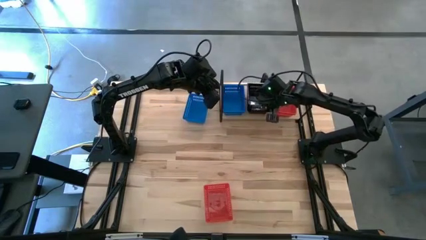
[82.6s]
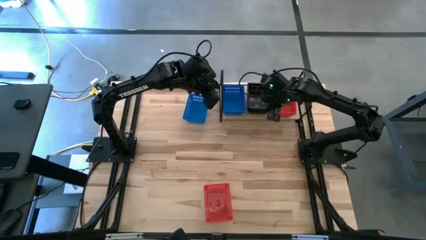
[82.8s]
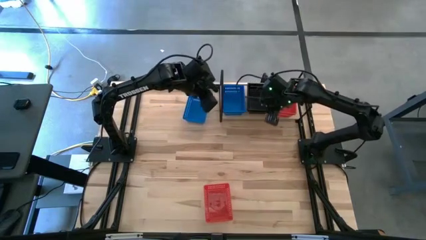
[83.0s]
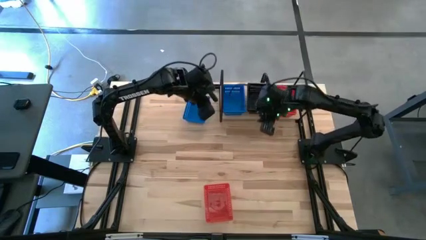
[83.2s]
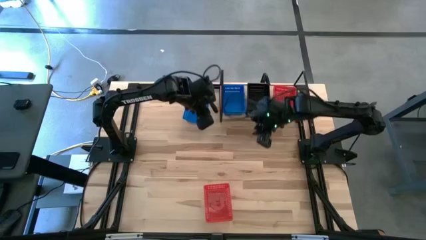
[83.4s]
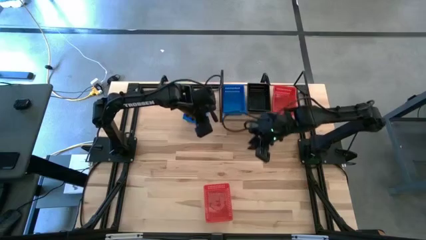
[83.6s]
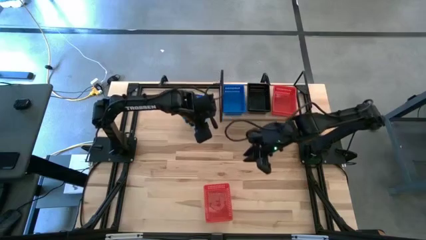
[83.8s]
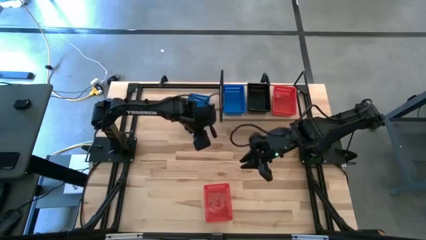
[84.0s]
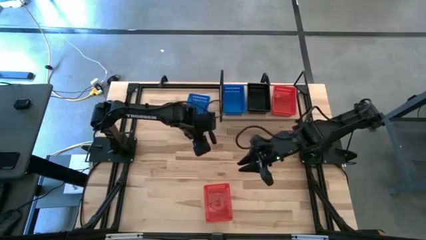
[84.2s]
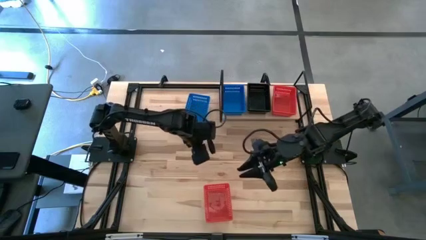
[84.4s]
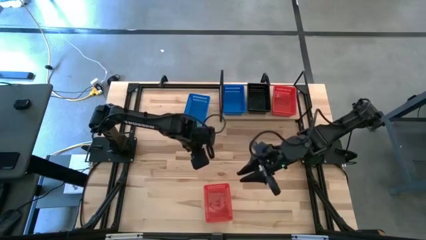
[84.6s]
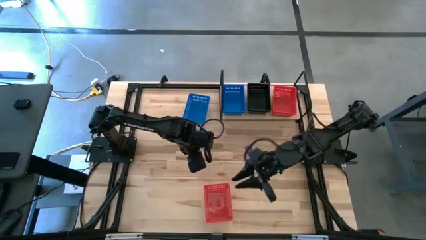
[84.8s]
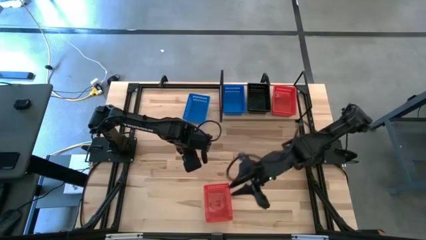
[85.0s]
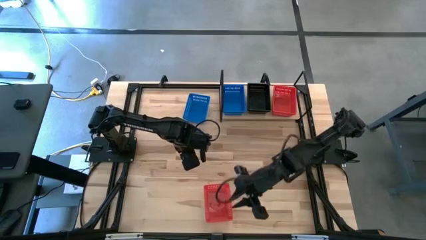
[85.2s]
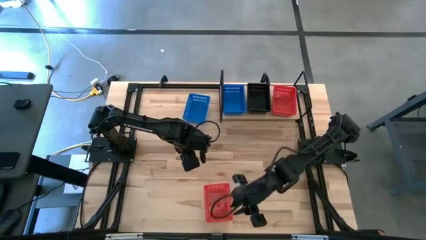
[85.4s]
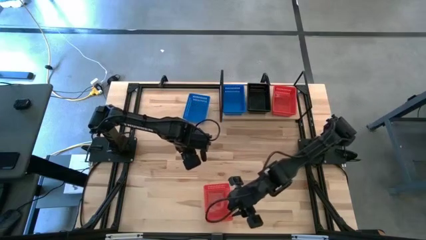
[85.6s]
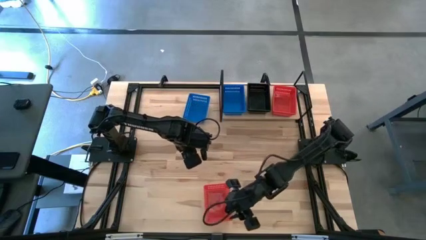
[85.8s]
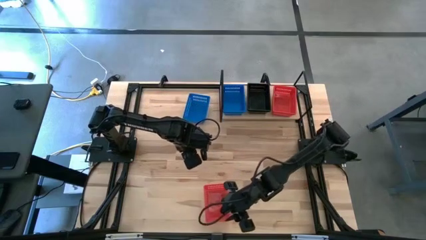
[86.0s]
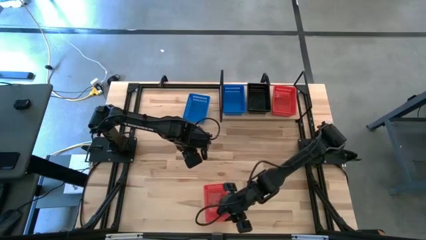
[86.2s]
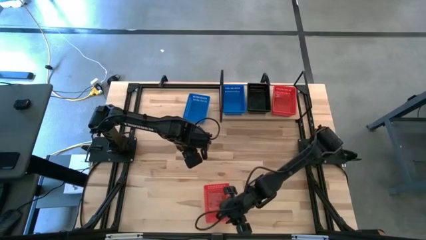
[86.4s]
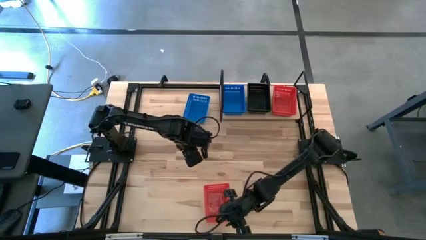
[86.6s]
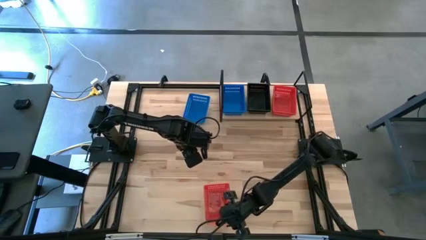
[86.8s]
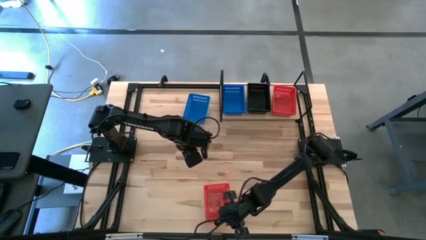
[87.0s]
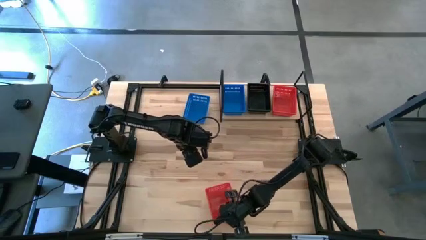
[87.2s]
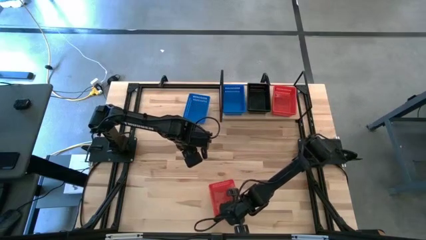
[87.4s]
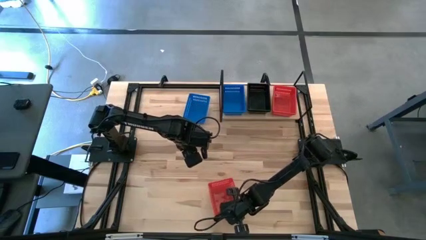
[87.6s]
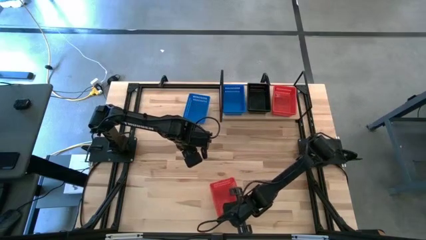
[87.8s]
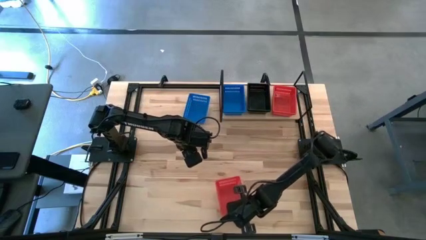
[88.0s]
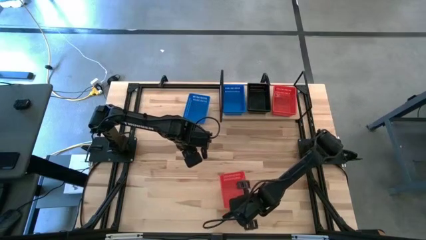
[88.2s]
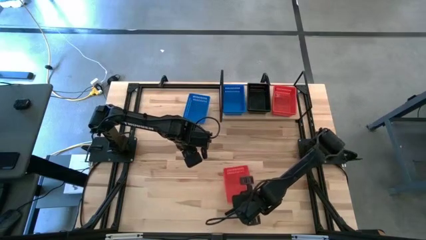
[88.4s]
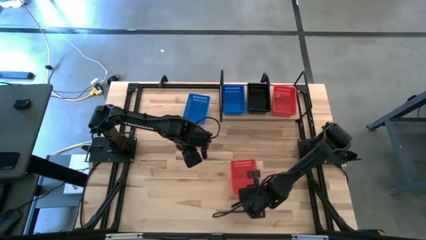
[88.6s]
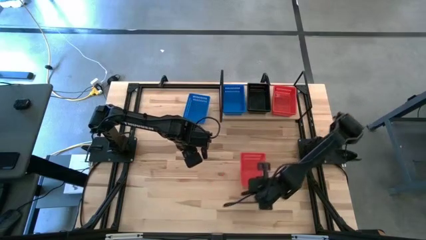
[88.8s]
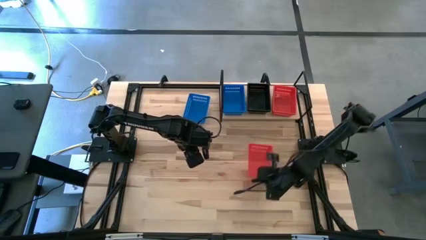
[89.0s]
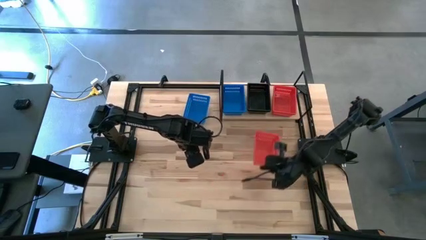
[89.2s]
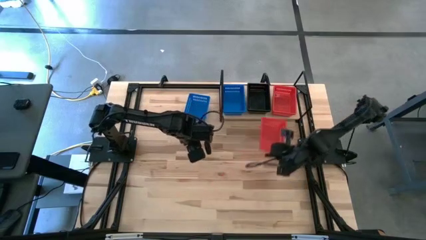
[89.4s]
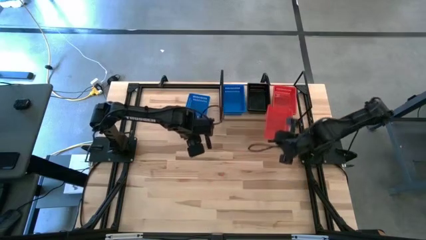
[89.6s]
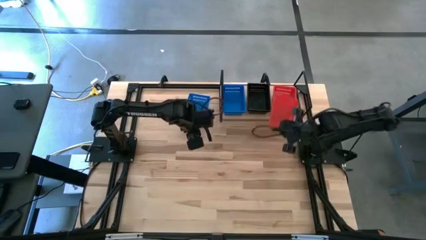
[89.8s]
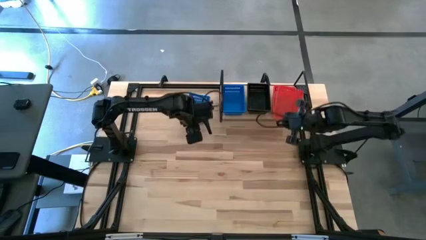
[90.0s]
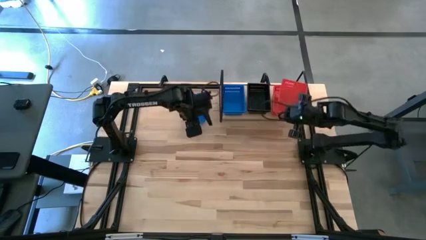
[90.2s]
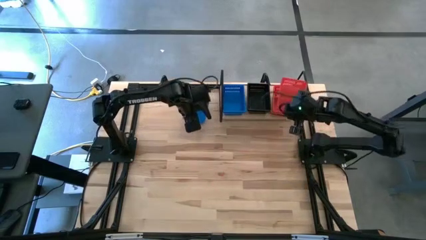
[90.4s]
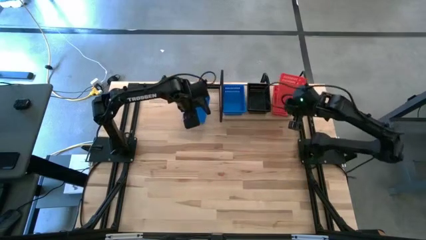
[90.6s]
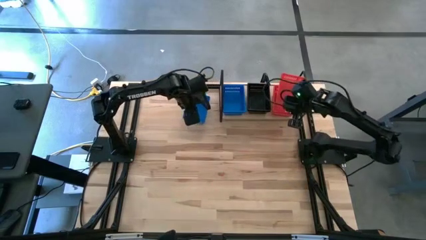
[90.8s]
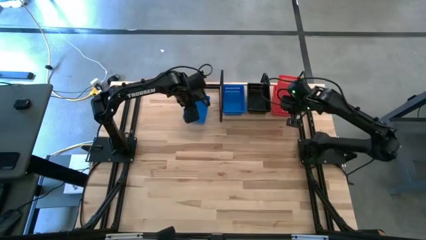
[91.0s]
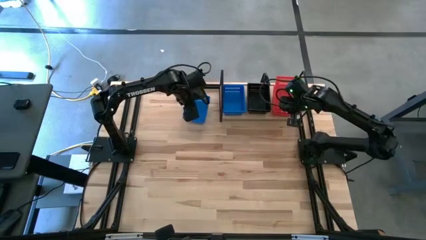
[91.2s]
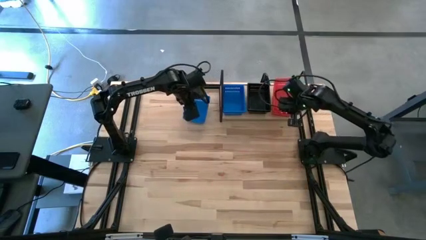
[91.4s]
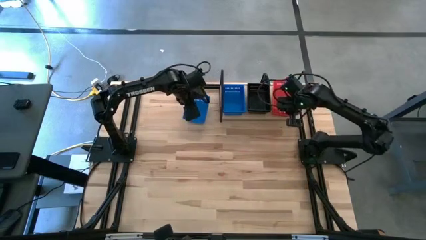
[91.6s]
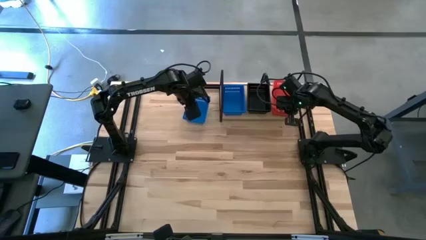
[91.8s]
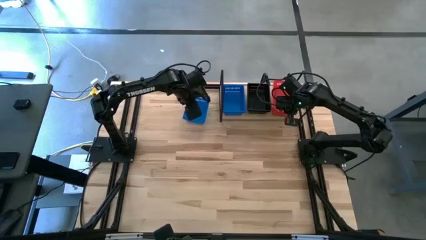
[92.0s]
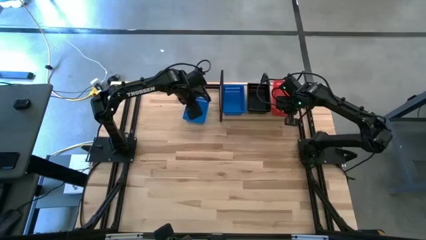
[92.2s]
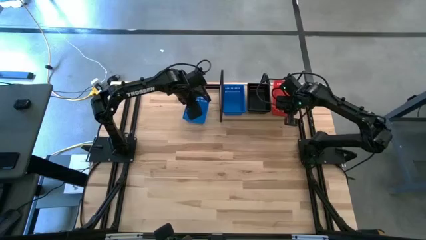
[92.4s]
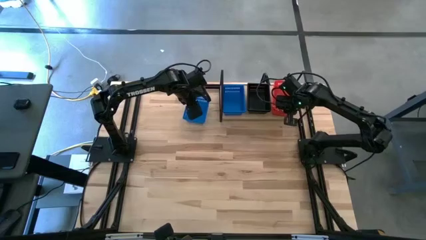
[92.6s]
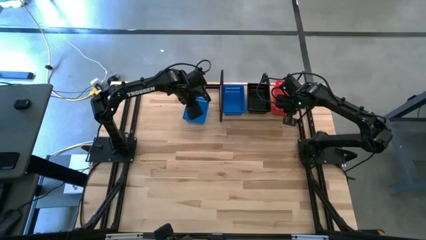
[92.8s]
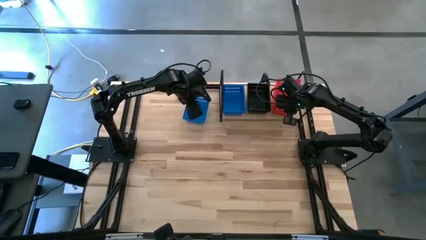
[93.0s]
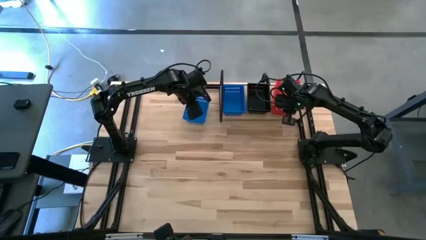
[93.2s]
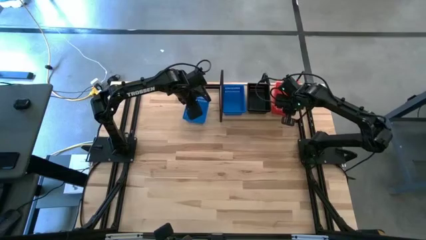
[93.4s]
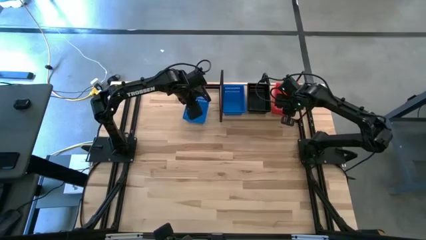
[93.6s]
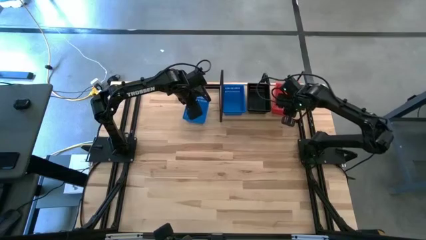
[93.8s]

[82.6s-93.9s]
Task: Stack baskets on shelf by color
Stack the red bin on top of the other red bin on the shelf

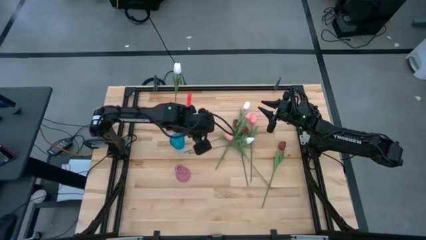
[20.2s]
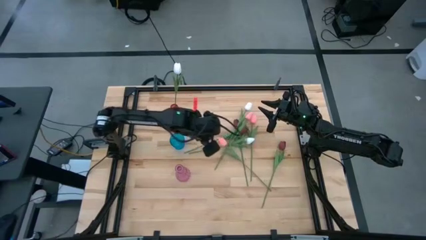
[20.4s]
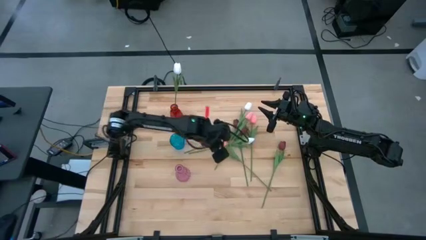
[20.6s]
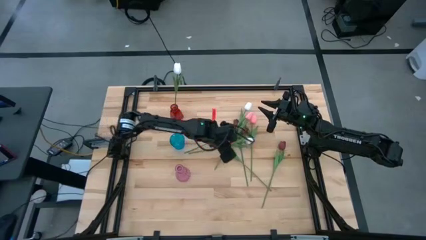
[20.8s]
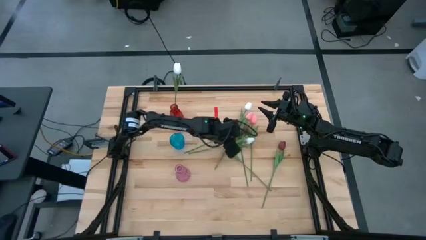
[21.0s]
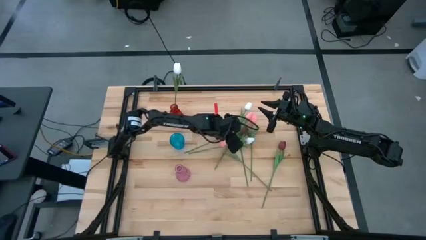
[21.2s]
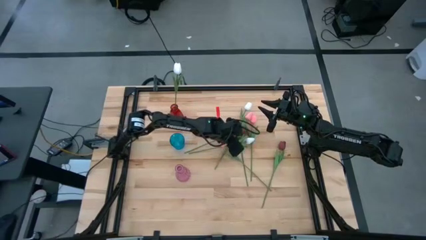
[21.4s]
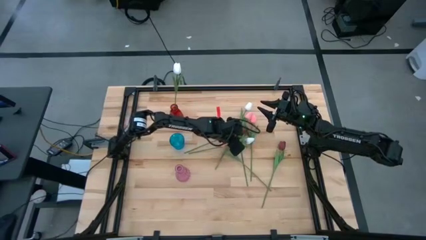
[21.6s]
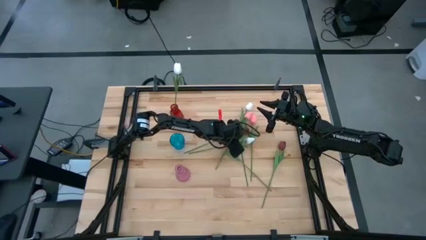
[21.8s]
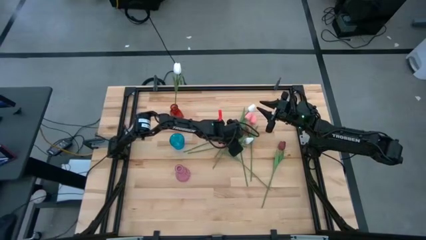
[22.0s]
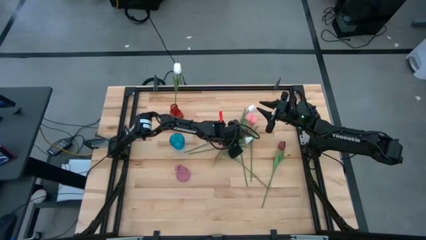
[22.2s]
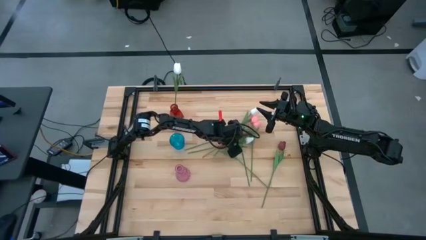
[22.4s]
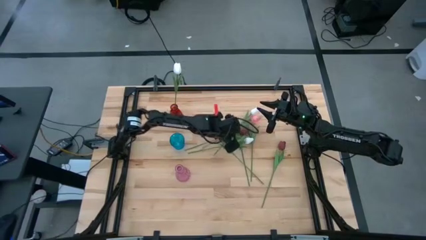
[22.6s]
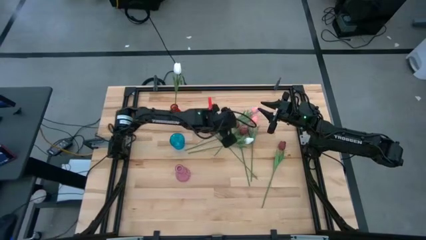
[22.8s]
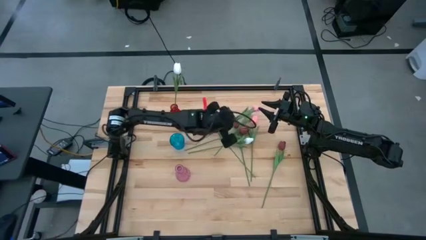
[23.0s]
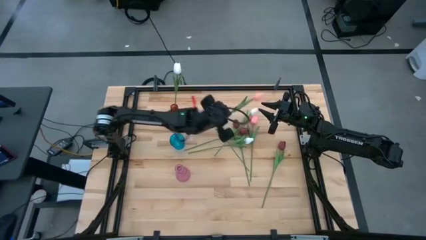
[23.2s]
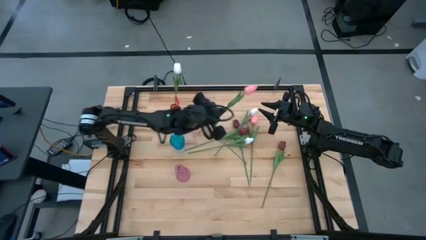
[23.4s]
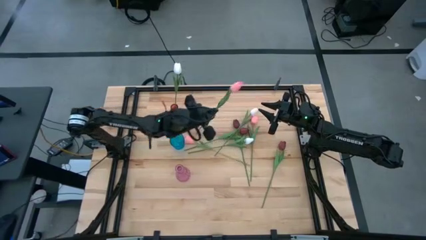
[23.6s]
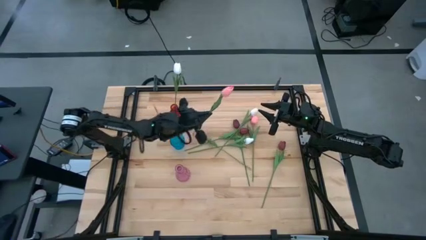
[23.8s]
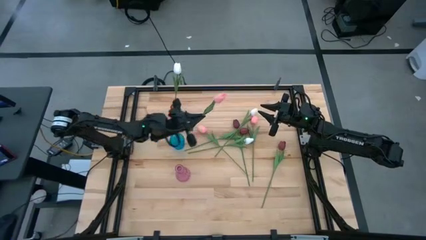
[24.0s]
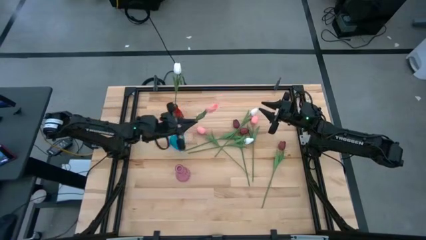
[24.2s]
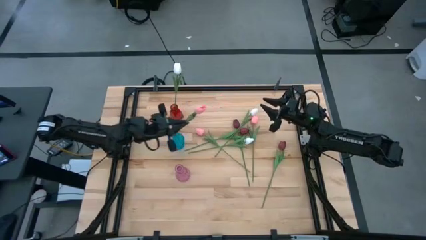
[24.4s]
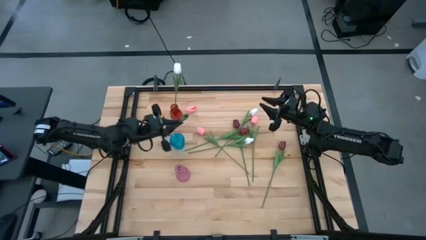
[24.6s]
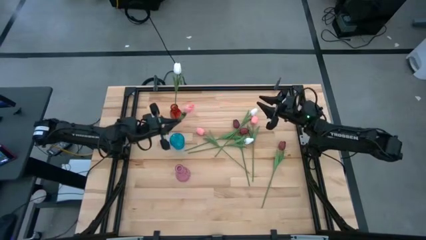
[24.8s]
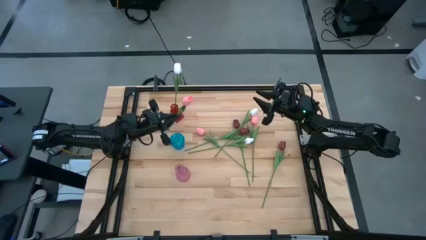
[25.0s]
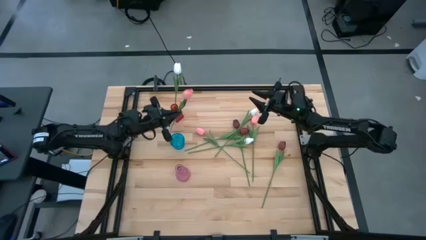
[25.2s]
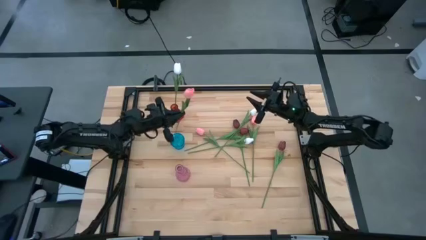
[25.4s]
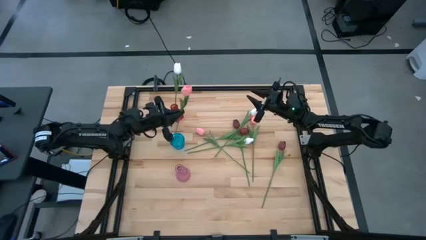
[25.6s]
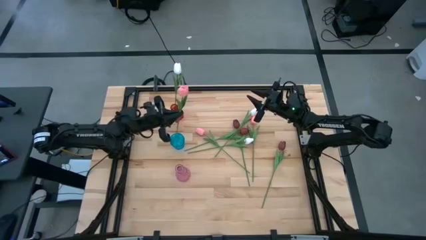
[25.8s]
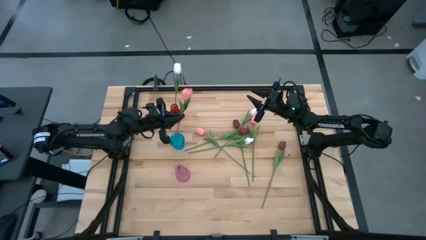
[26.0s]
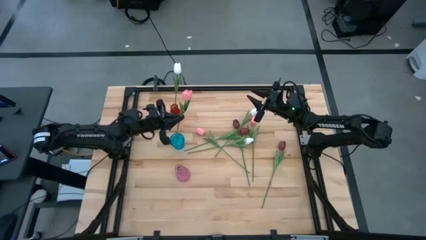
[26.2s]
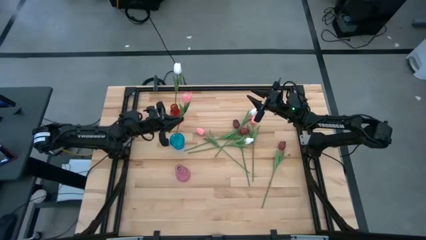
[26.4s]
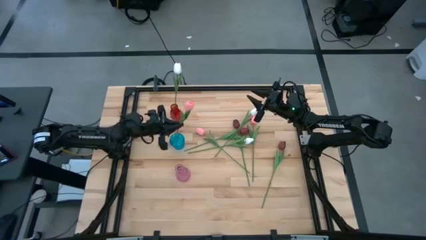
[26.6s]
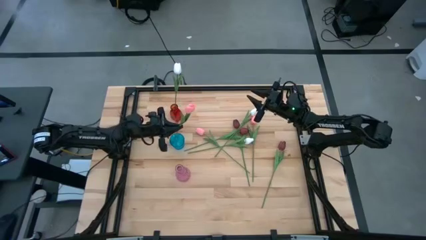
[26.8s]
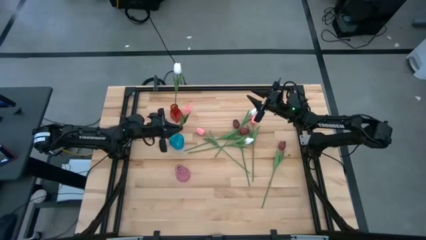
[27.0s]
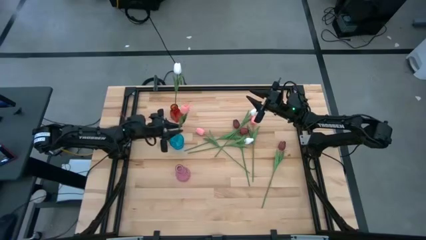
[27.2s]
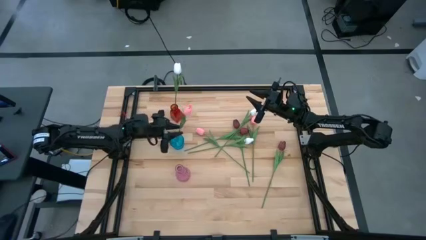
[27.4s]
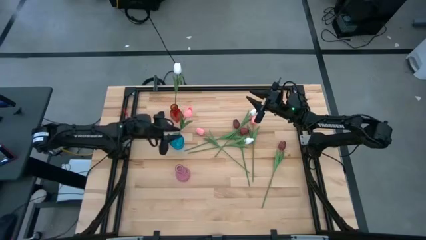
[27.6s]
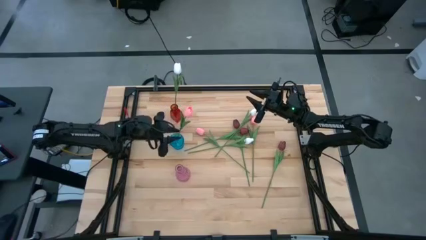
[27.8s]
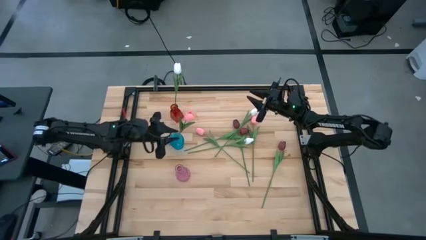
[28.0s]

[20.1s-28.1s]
Task: Sort flowers into vase by color
Put the left pink flower into the blue vase
